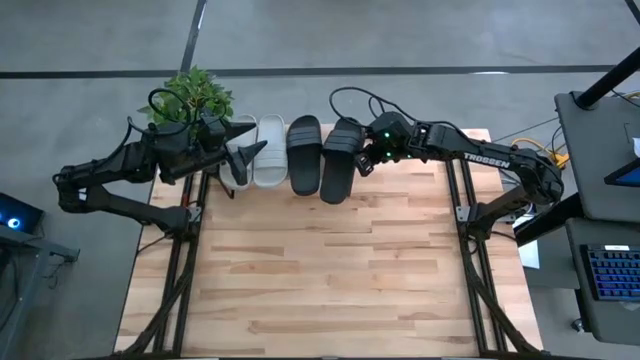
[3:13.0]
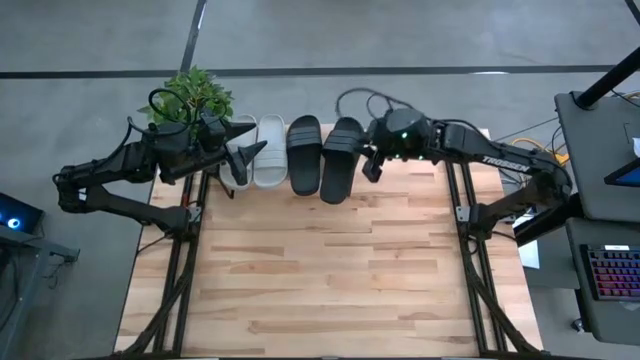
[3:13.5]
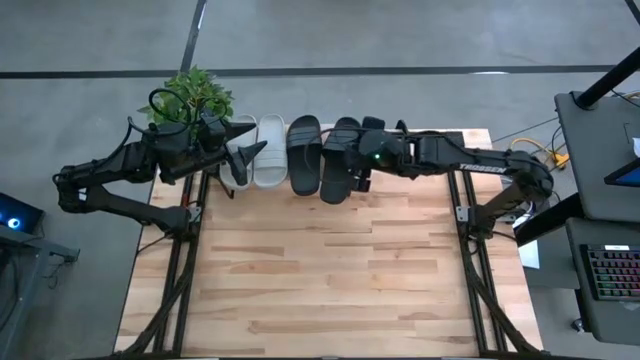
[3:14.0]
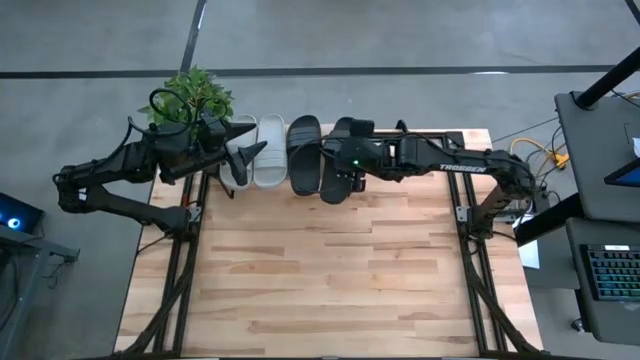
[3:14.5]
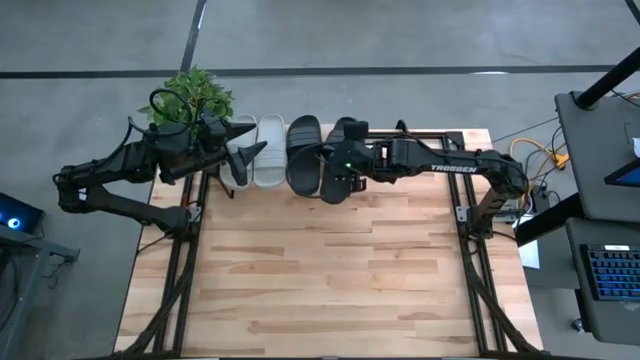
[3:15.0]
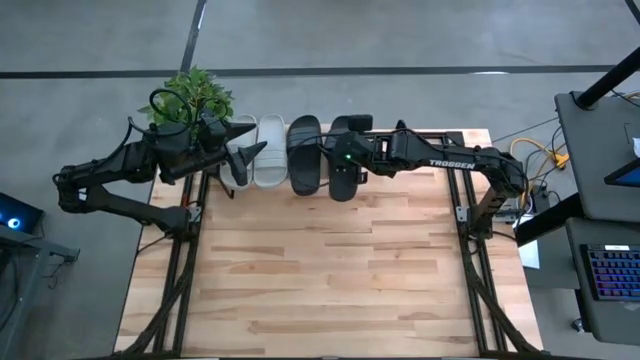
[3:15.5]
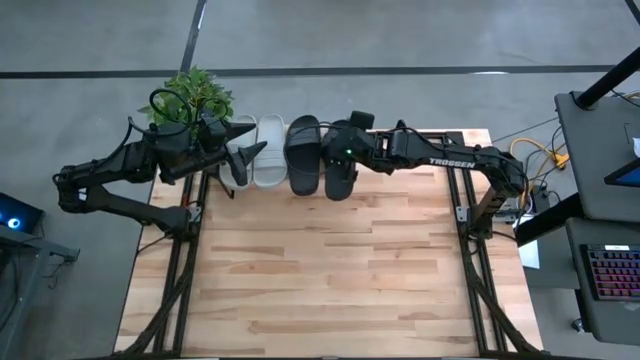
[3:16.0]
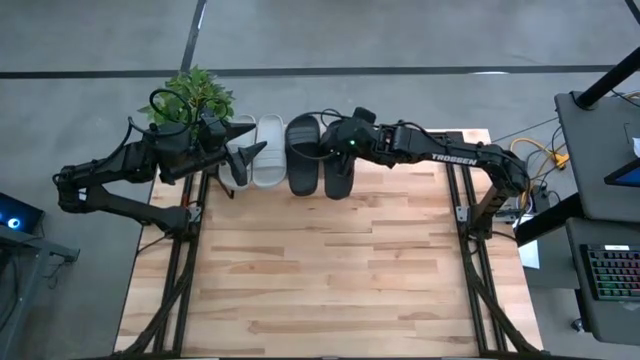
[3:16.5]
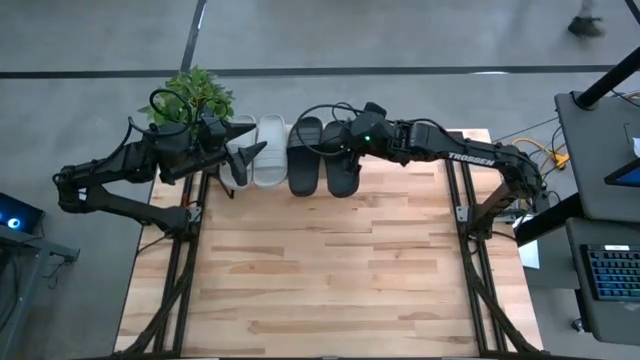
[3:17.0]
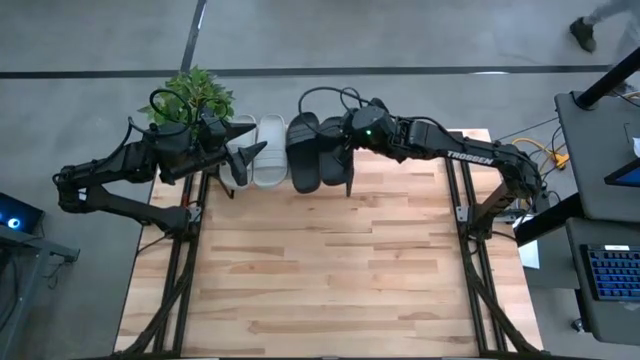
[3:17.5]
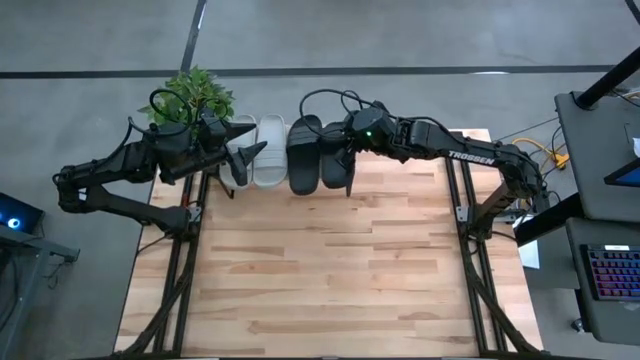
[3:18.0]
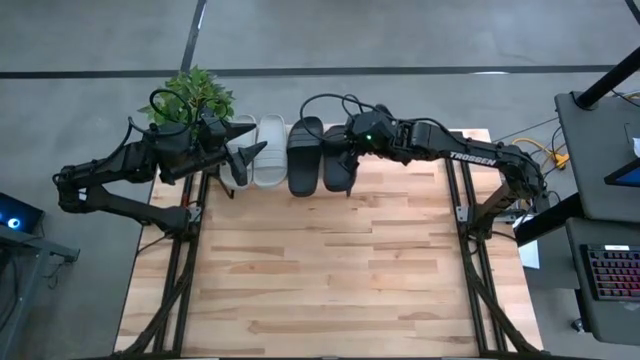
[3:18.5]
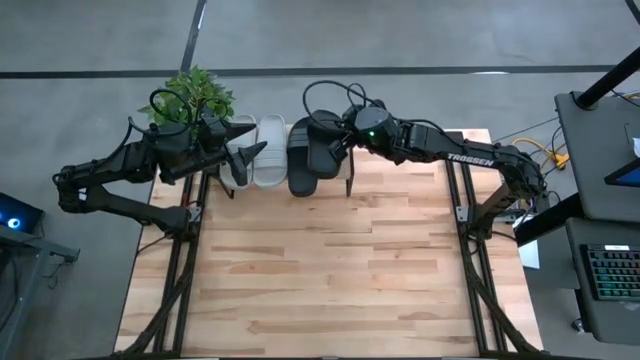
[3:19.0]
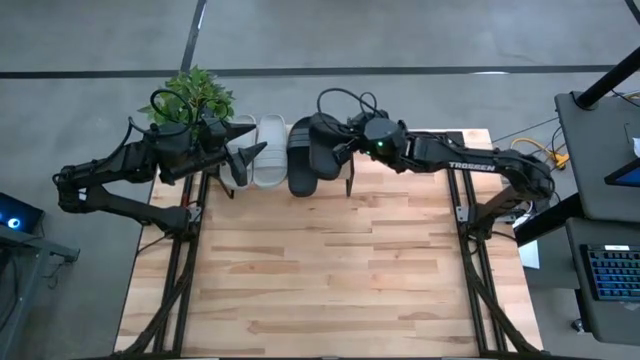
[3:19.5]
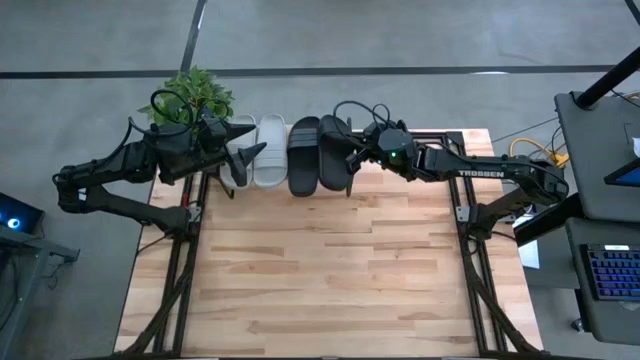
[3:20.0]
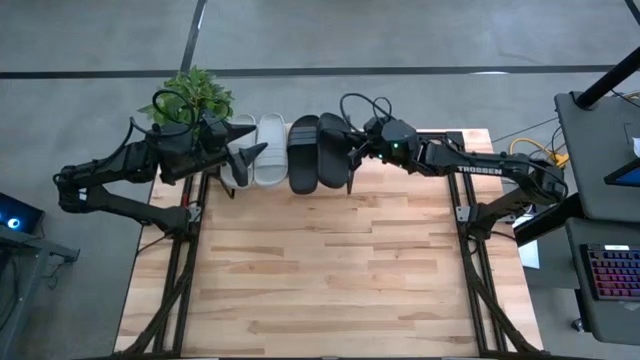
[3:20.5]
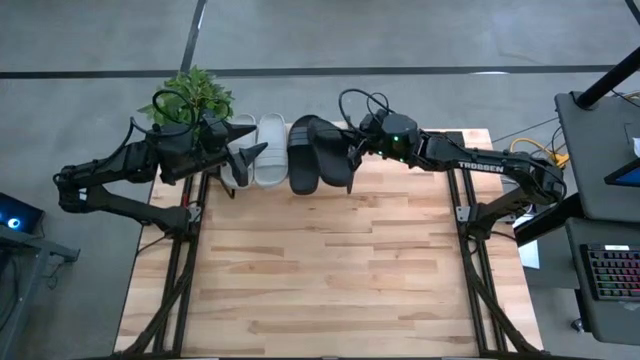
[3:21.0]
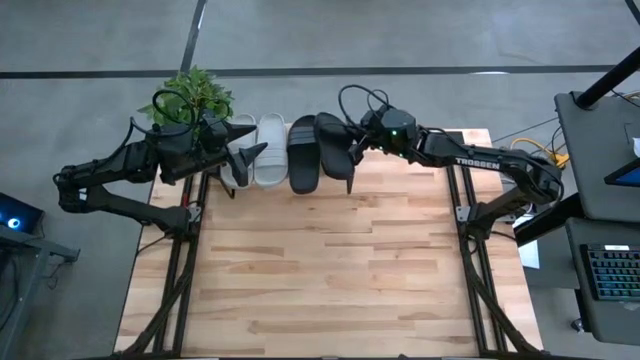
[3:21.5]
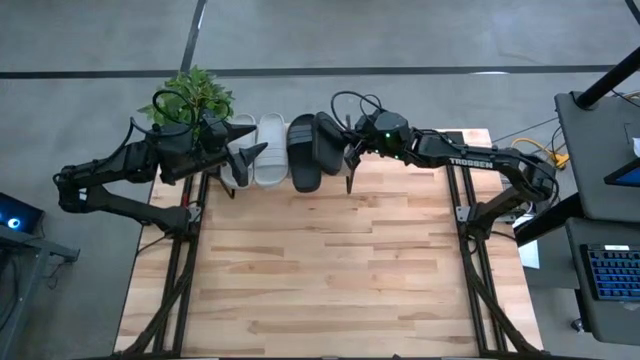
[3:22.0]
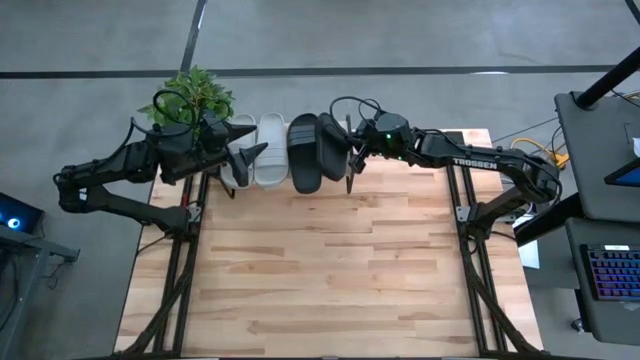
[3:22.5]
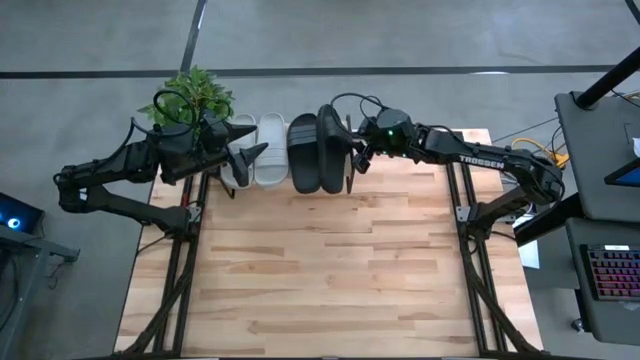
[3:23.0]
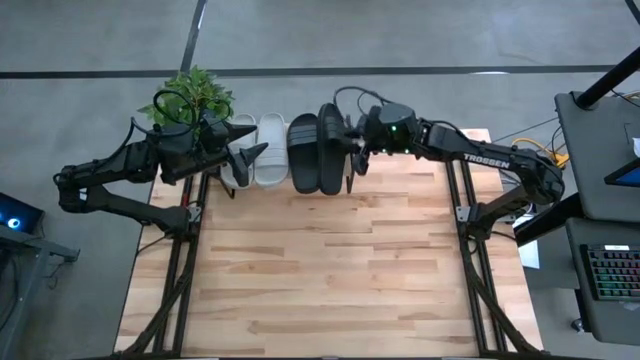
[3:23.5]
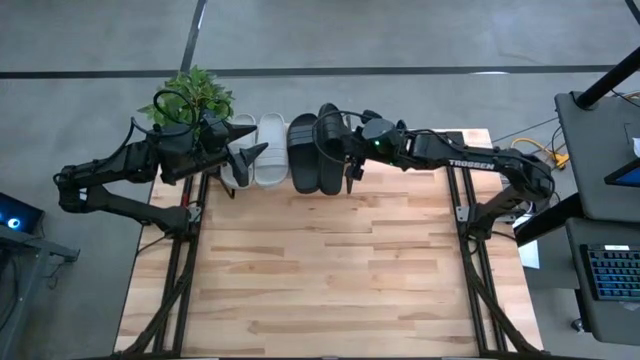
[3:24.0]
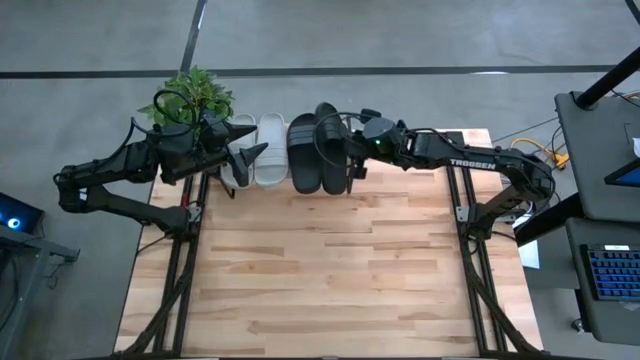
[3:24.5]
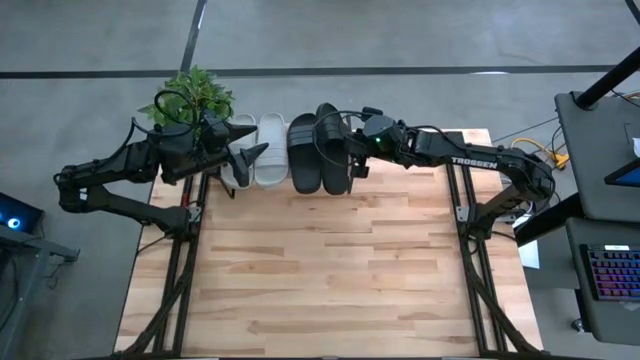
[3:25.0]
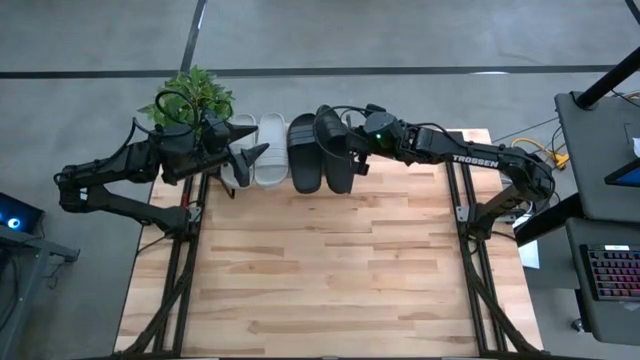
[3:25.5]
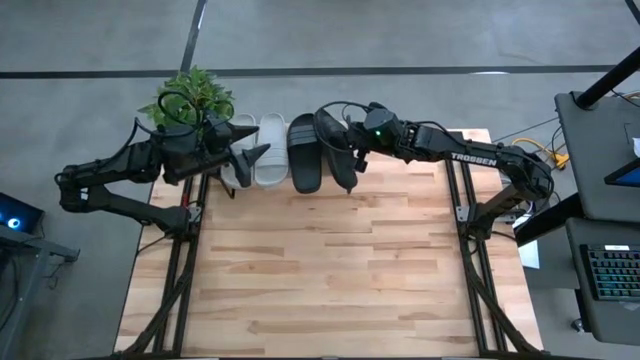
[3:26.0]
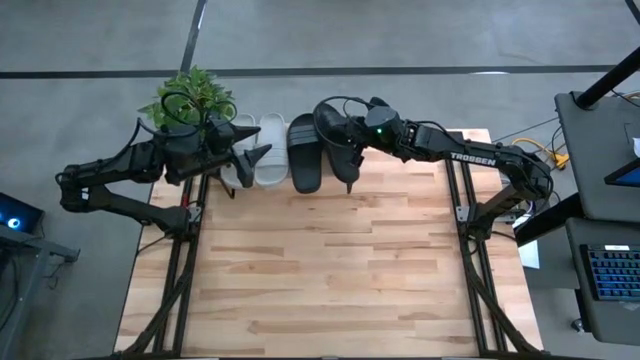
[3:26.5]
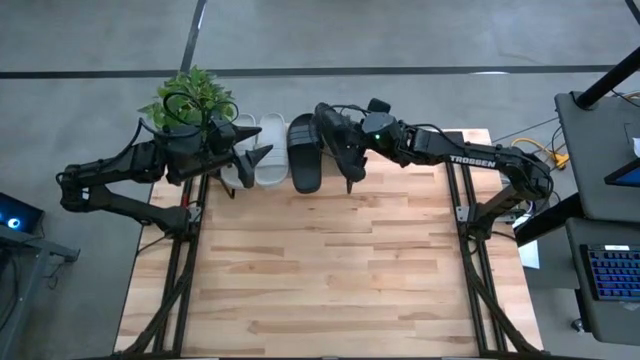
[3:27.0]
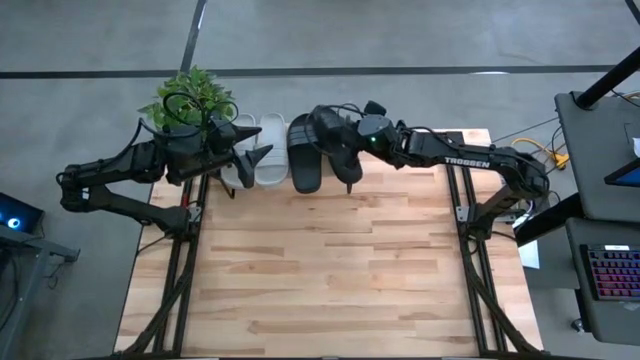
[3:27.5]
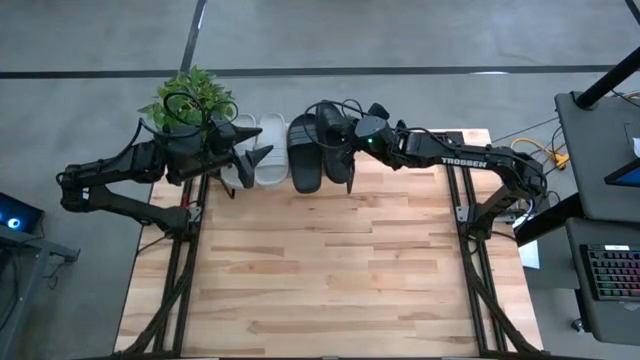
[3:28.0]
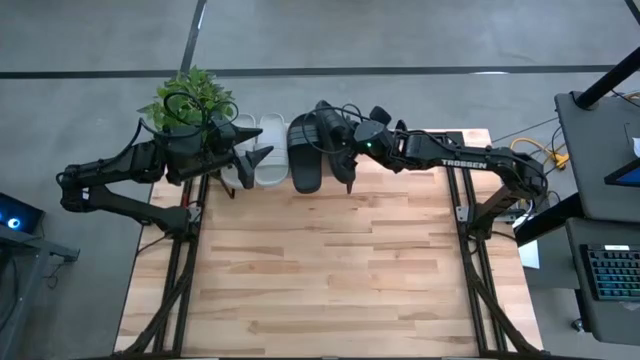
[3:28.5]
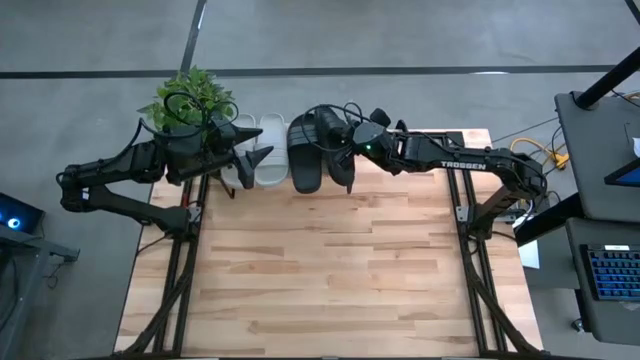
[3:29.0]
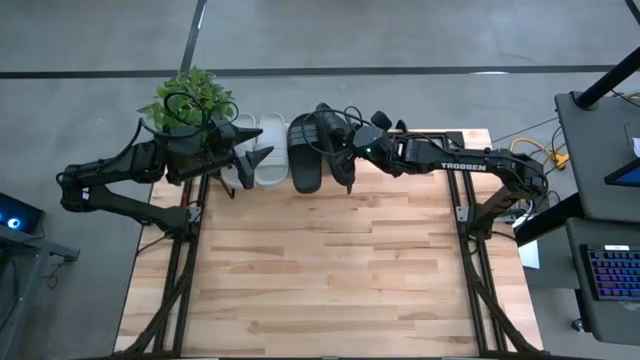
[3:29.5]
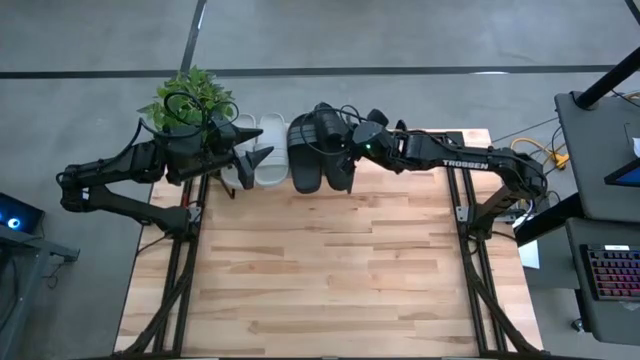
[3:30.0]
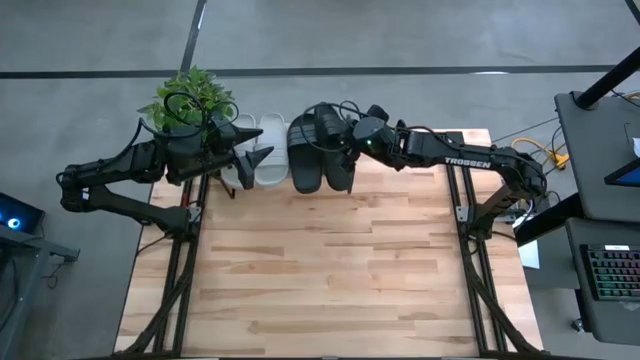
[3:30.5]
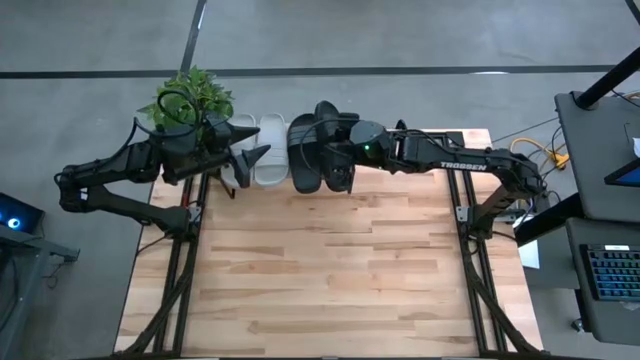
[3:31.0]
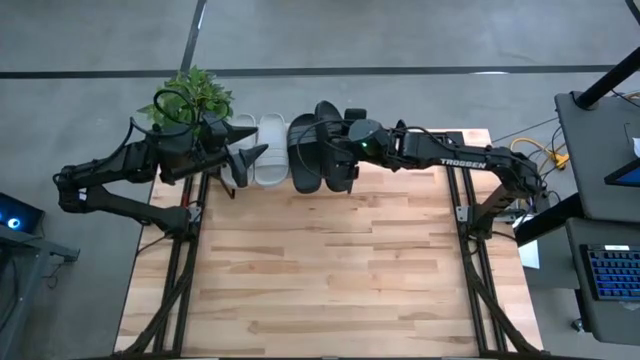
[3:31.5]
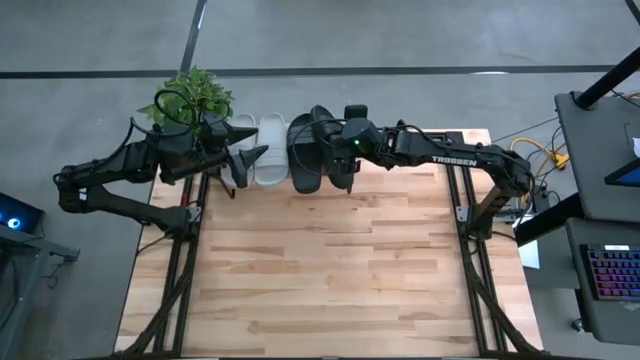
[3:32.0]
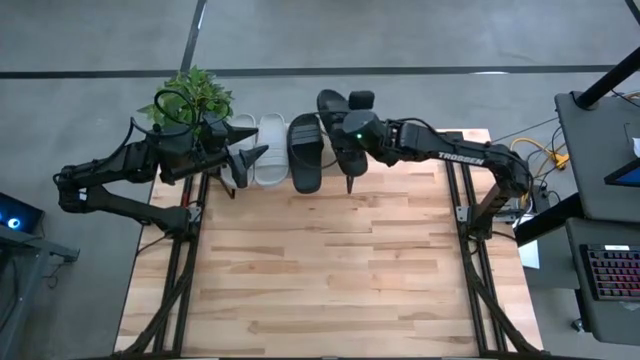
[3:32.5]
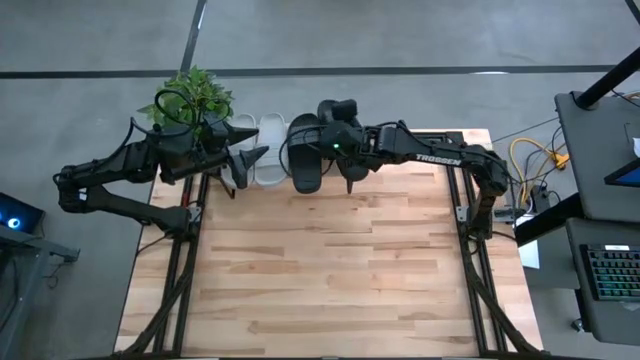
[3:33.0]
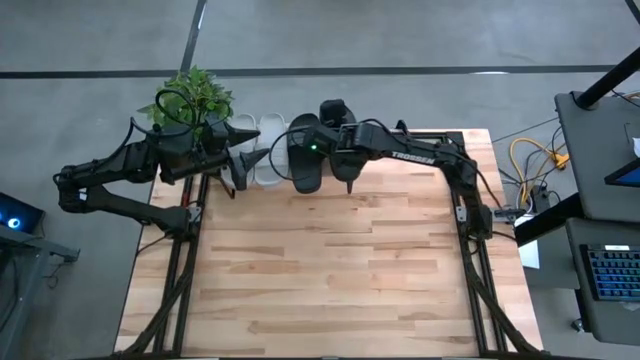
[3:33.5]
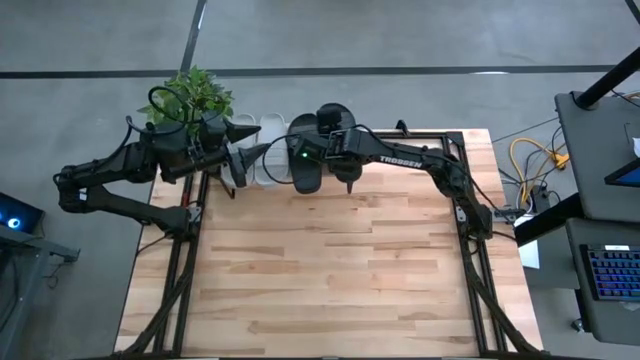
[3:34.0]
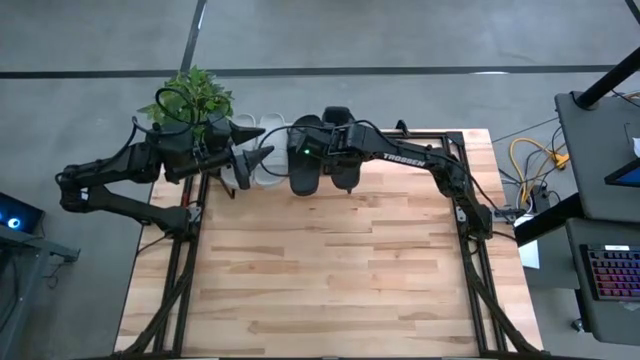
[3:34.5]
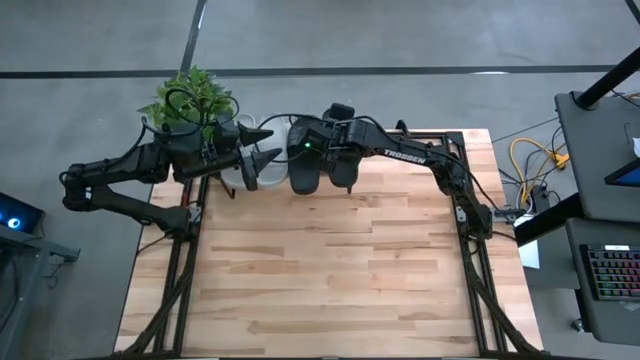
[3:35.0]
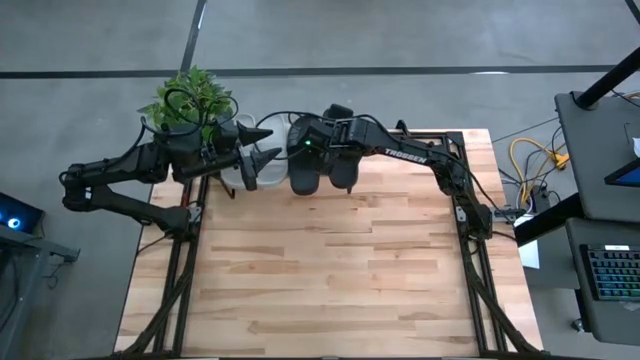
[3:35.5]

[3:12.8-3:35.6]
Task: Pick and place slides into the shelf
Adjust the right black slipper on the shelf
